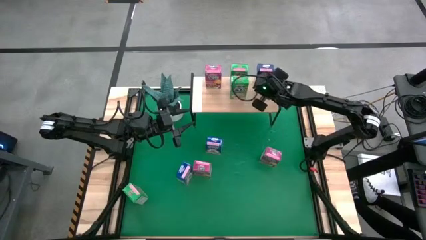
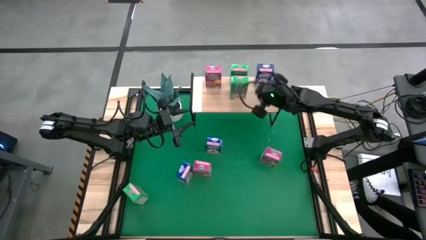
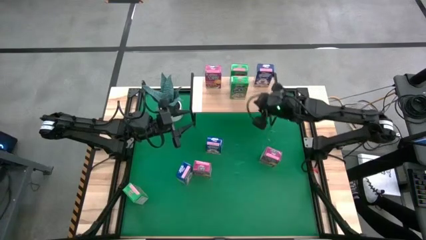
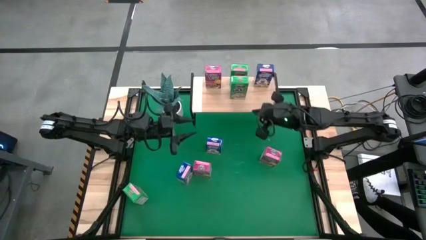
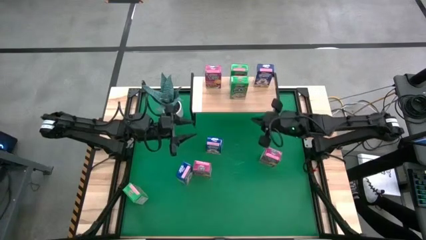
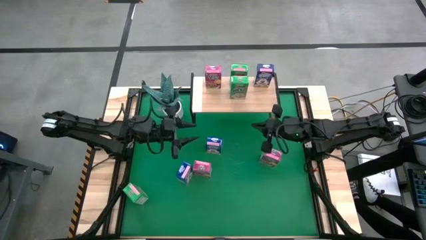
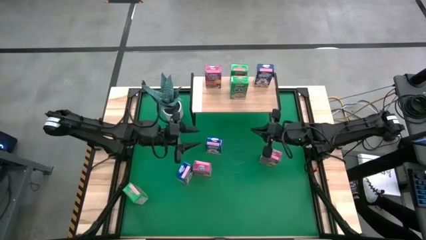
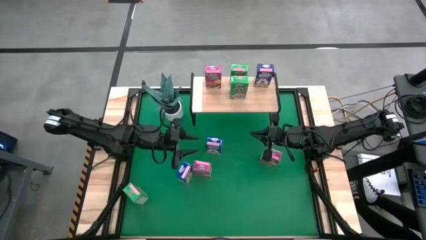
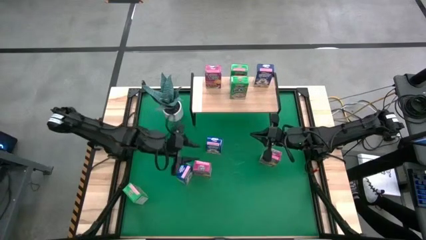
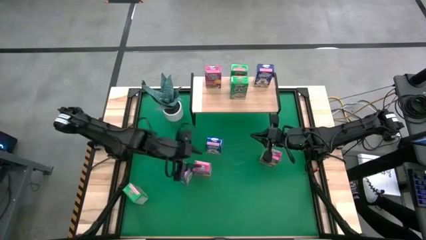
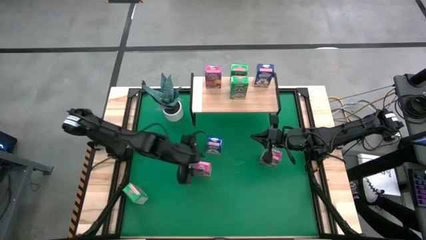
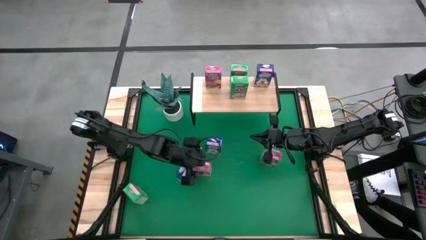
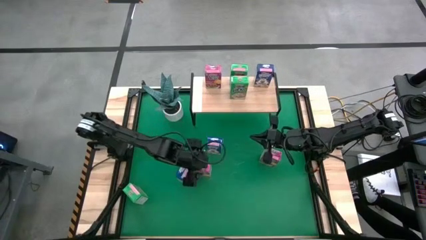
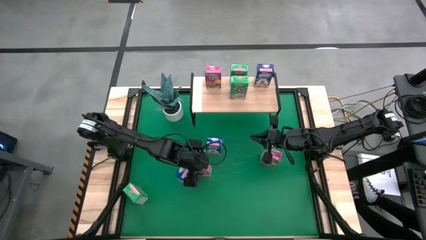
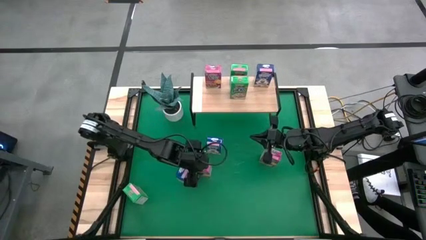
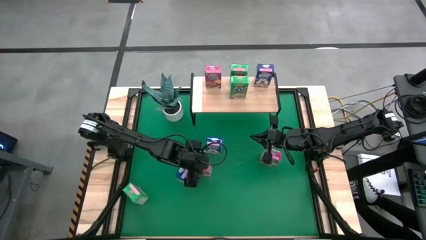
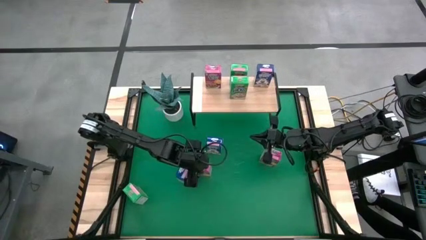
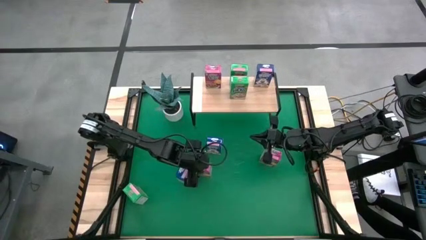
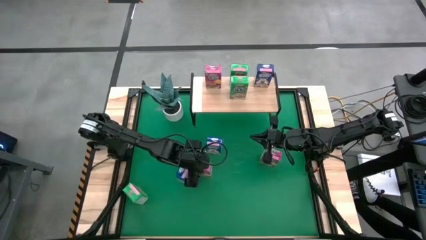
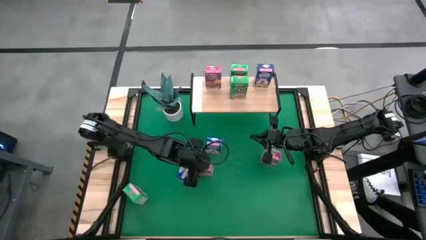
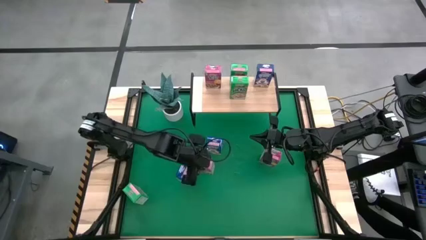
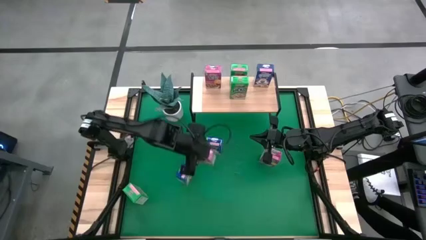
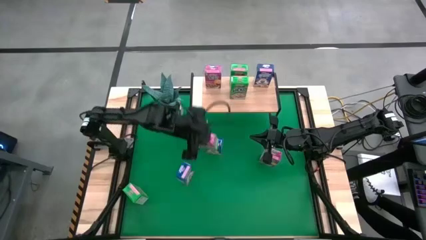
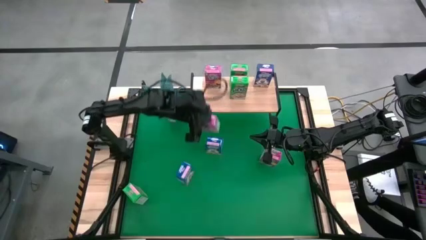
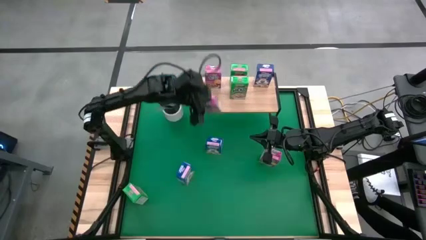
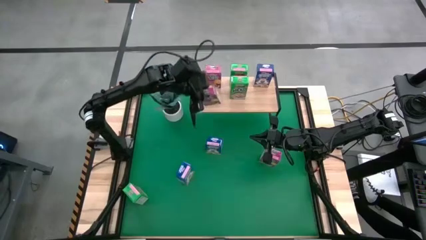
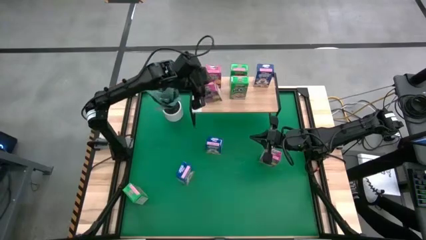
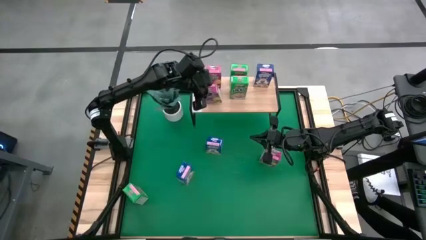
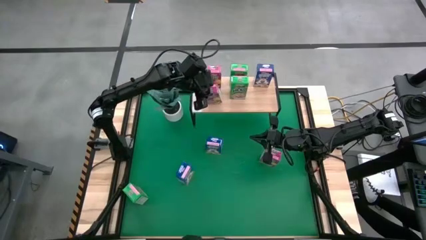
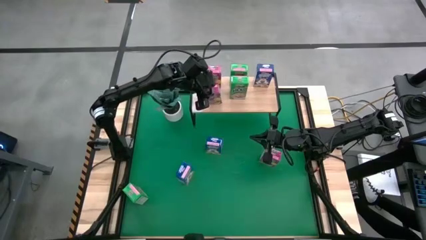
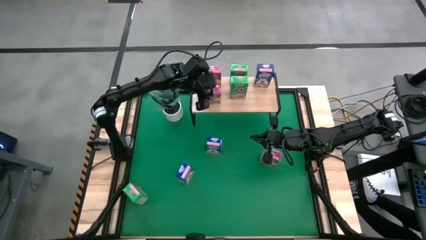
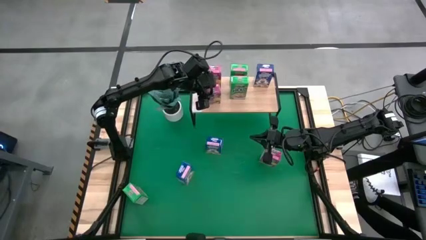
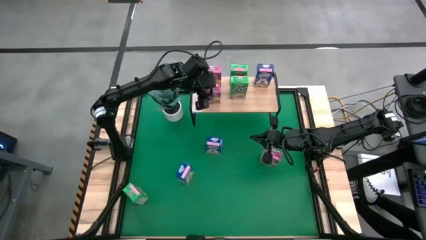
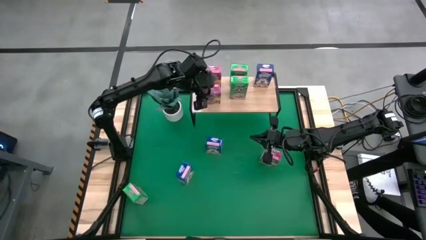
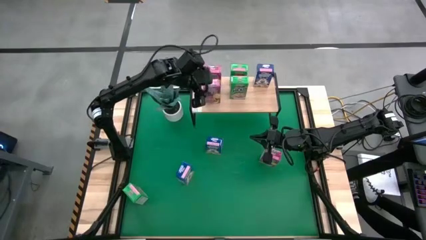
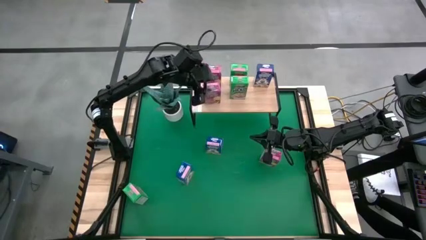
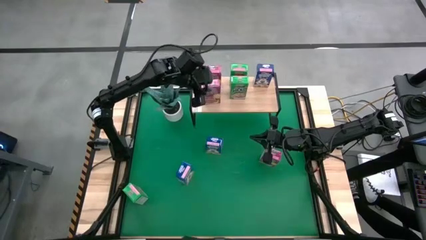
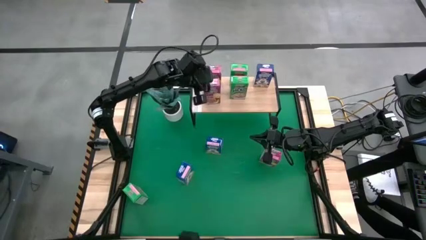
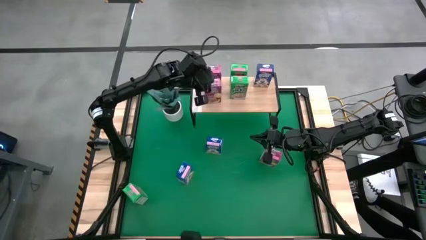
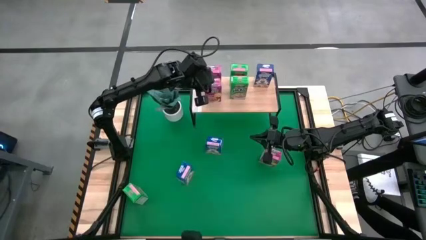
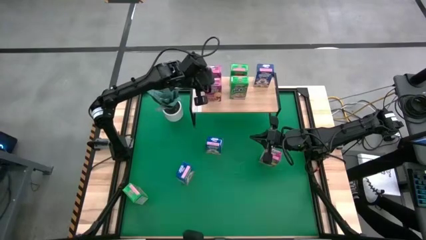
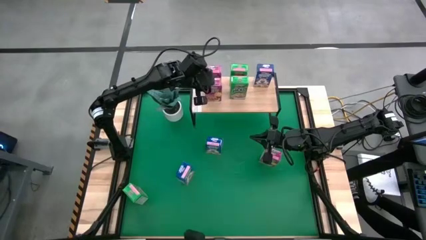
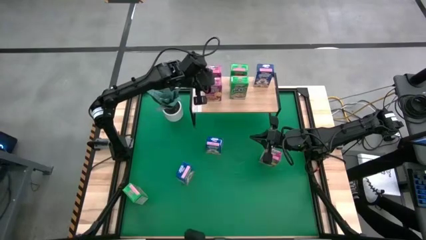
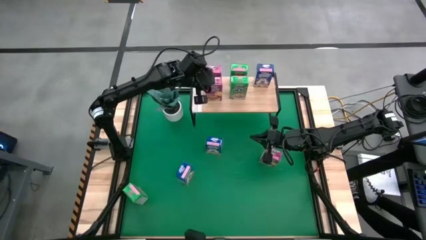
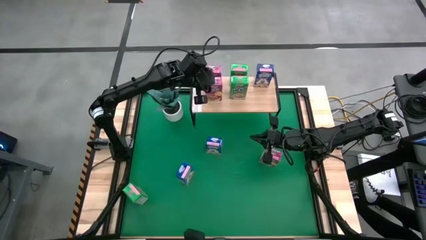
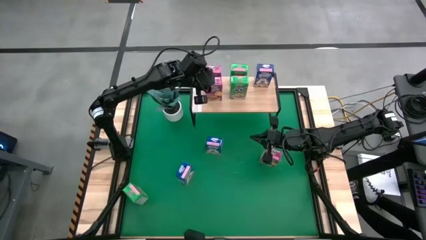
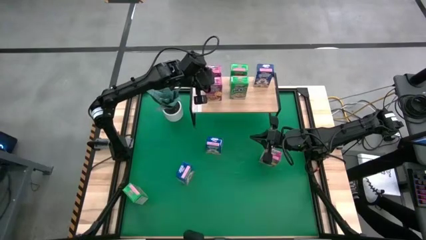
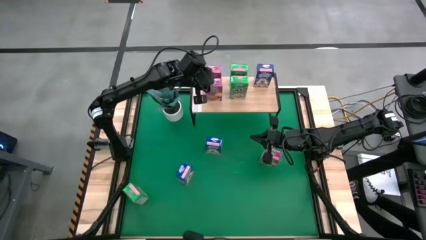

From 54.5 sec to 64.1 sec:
Task: Stack cereal on shelf
Put the left violet cereal box aligned with the other violet cereal box on the shelf
